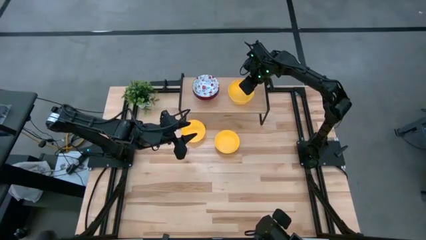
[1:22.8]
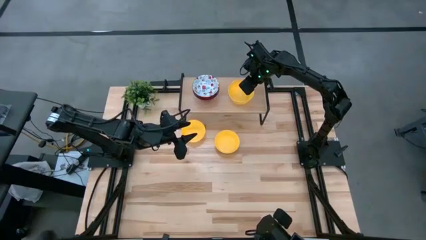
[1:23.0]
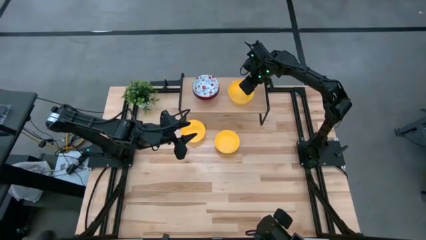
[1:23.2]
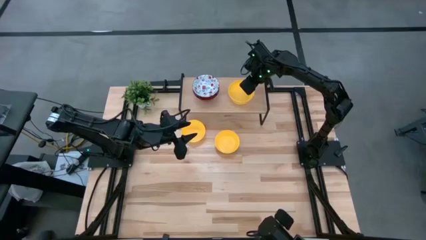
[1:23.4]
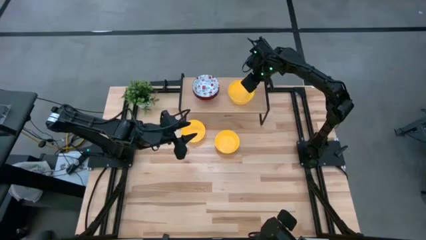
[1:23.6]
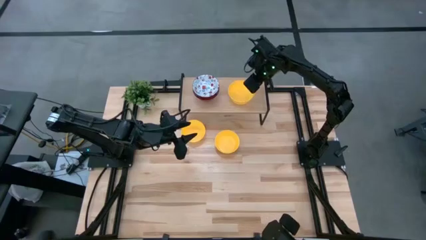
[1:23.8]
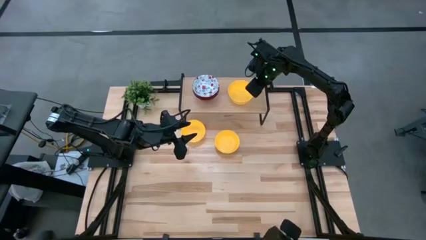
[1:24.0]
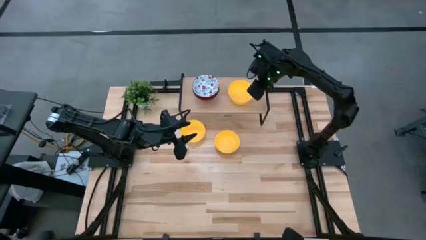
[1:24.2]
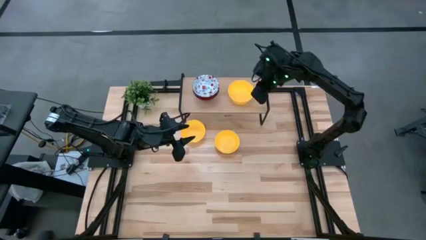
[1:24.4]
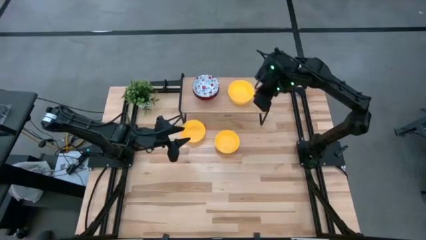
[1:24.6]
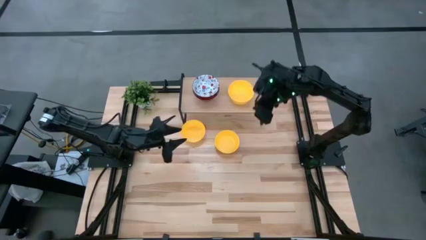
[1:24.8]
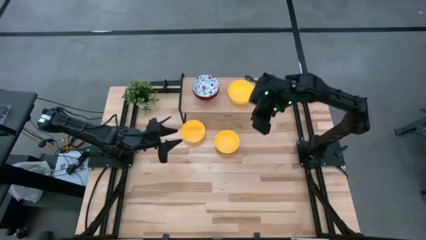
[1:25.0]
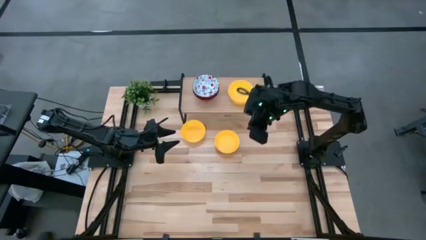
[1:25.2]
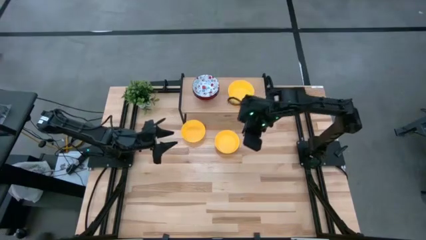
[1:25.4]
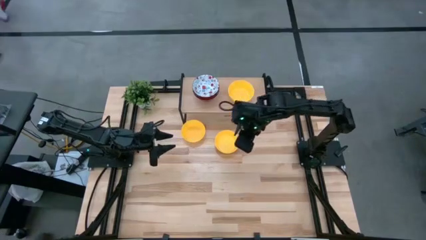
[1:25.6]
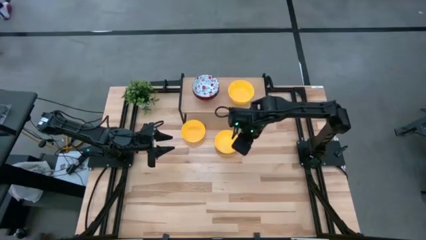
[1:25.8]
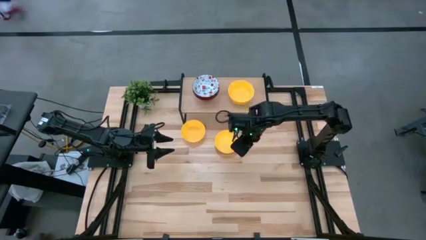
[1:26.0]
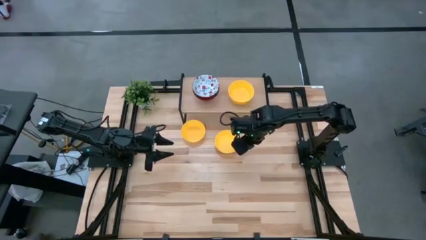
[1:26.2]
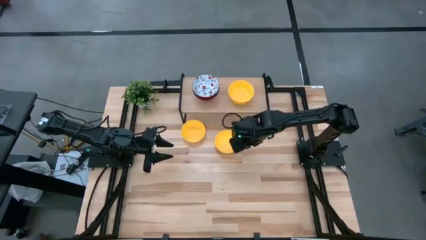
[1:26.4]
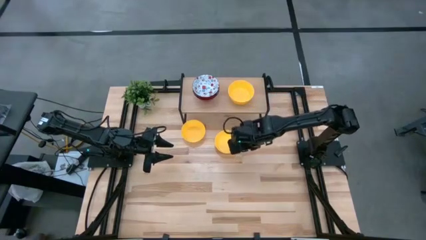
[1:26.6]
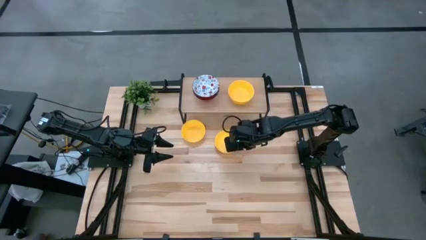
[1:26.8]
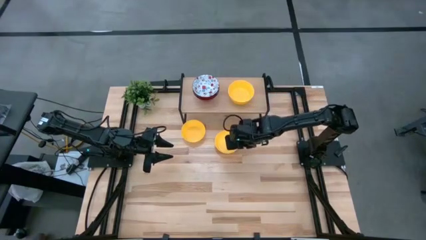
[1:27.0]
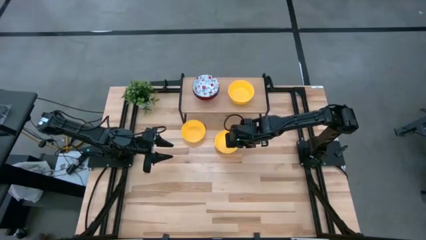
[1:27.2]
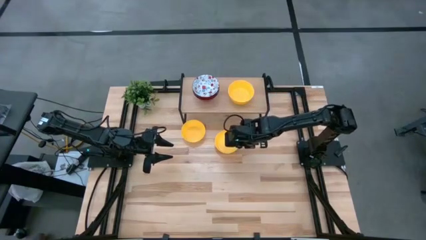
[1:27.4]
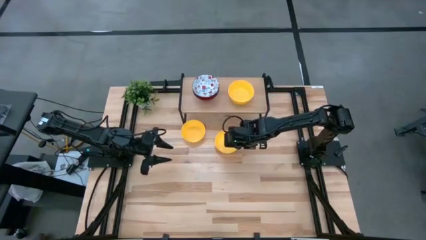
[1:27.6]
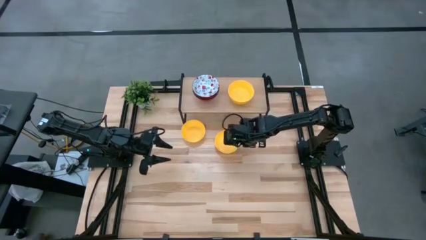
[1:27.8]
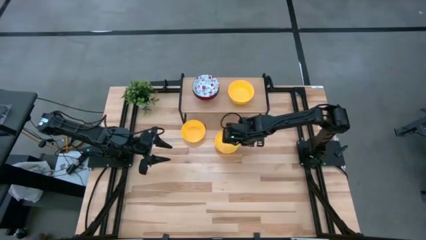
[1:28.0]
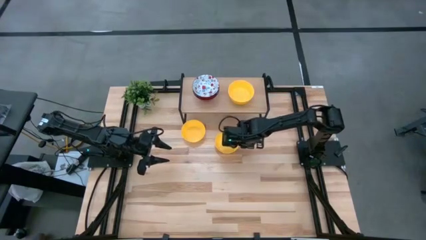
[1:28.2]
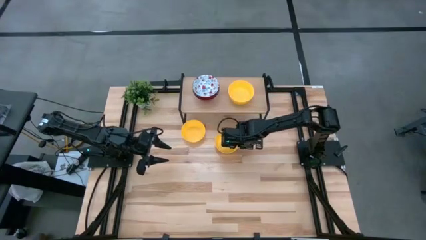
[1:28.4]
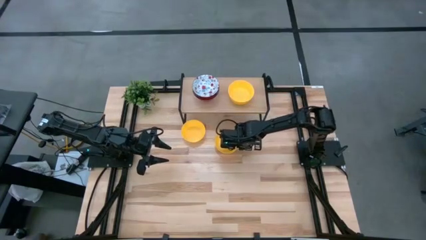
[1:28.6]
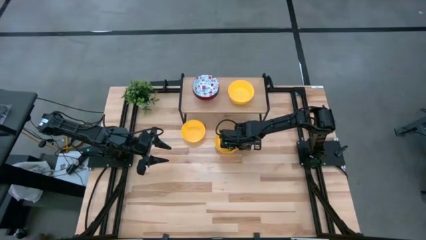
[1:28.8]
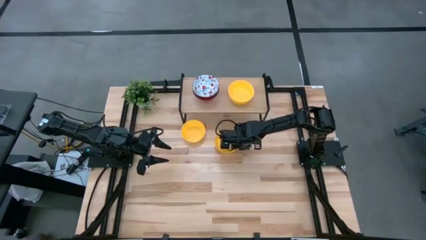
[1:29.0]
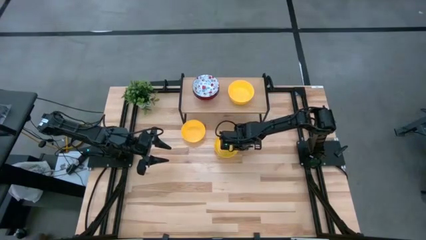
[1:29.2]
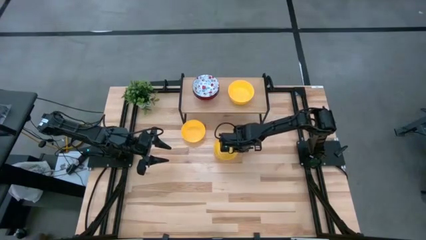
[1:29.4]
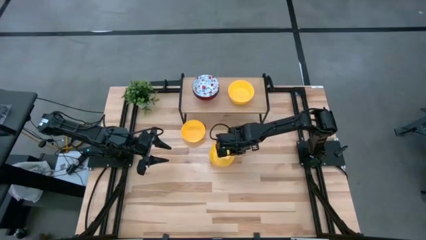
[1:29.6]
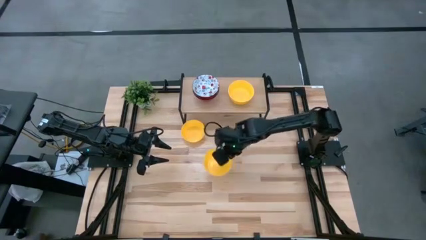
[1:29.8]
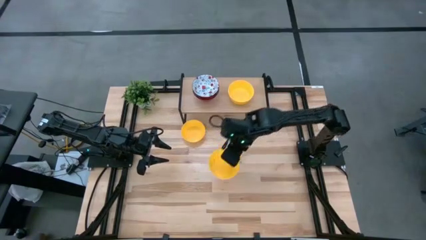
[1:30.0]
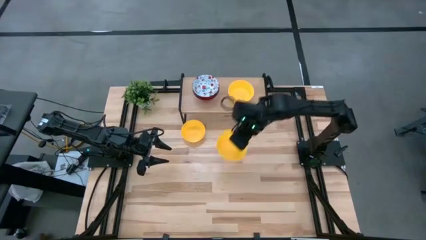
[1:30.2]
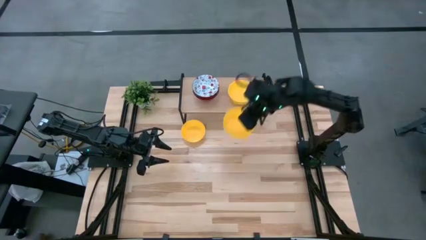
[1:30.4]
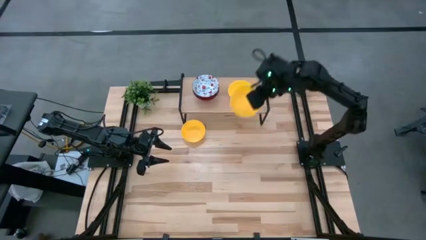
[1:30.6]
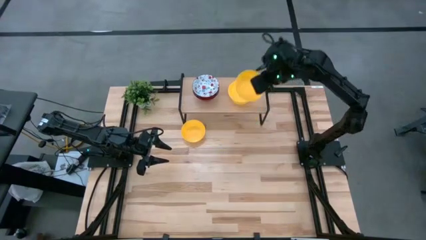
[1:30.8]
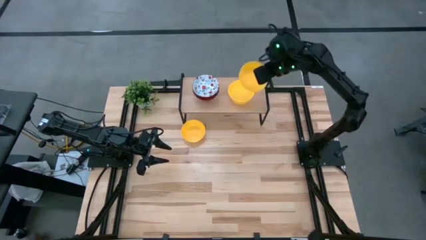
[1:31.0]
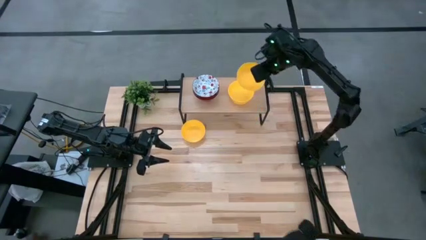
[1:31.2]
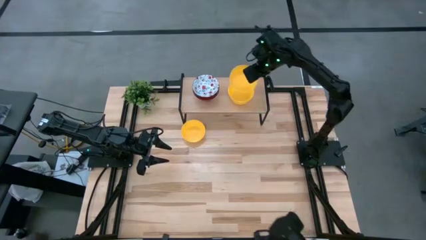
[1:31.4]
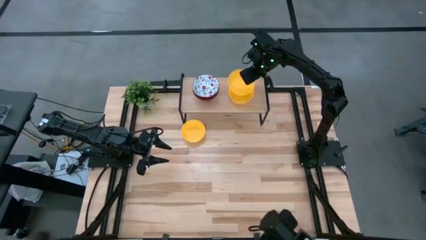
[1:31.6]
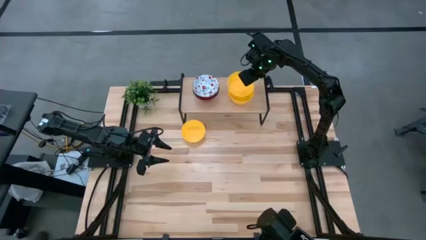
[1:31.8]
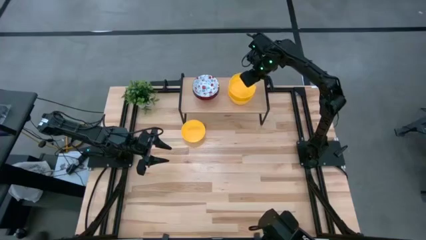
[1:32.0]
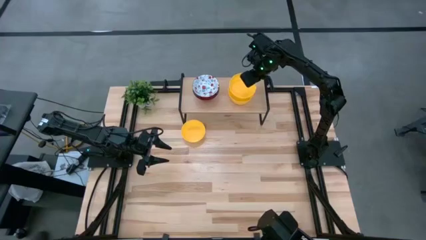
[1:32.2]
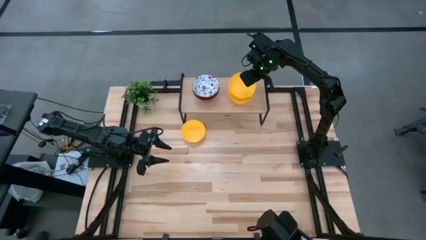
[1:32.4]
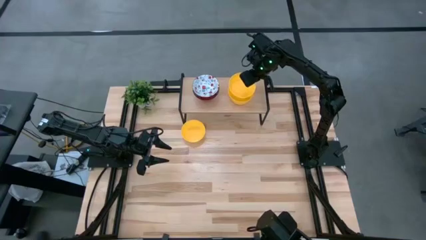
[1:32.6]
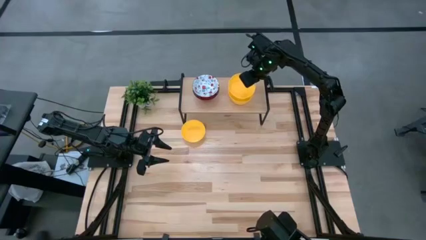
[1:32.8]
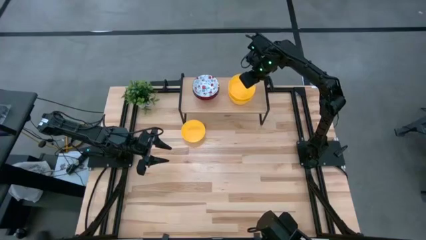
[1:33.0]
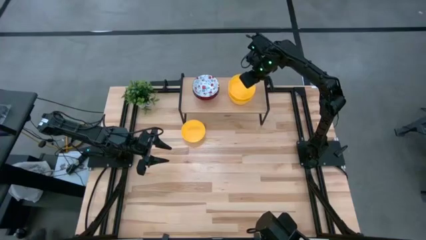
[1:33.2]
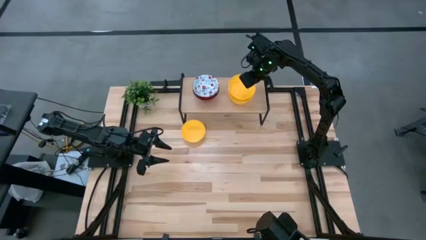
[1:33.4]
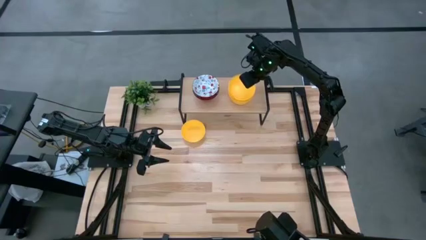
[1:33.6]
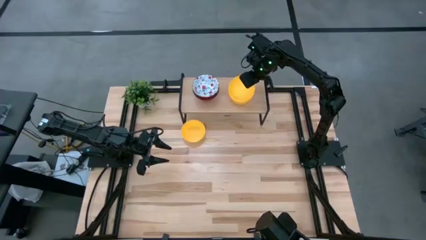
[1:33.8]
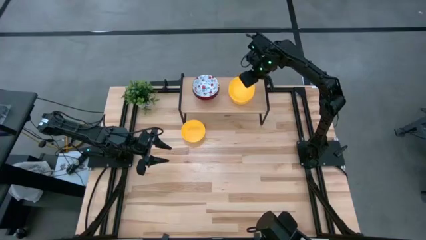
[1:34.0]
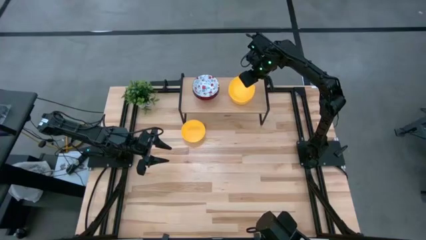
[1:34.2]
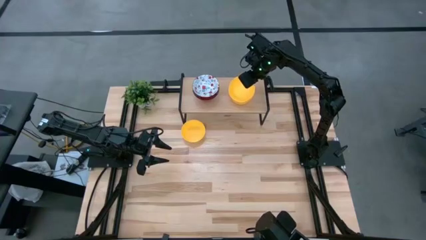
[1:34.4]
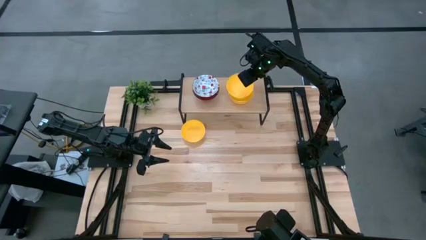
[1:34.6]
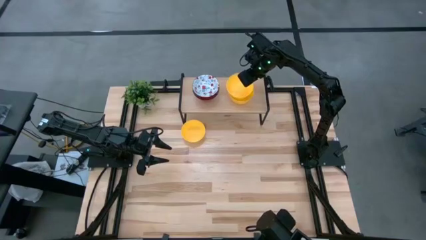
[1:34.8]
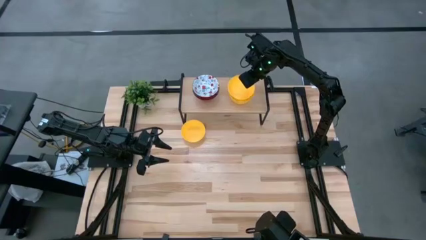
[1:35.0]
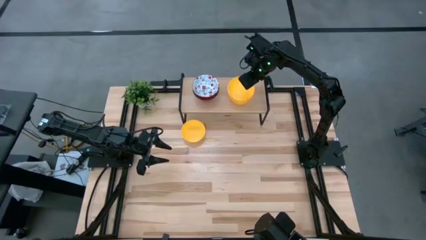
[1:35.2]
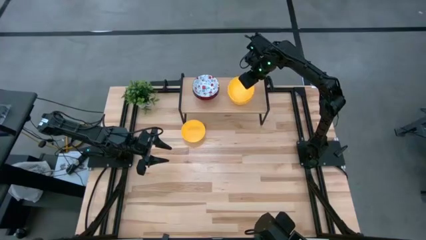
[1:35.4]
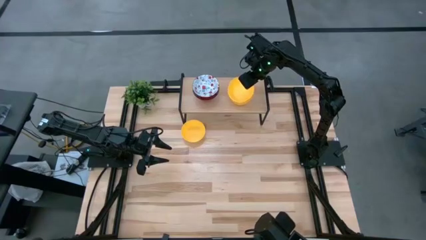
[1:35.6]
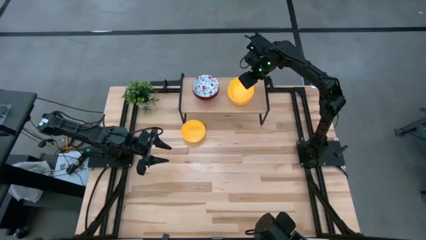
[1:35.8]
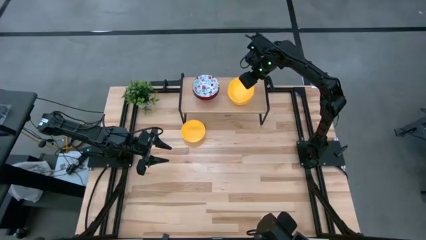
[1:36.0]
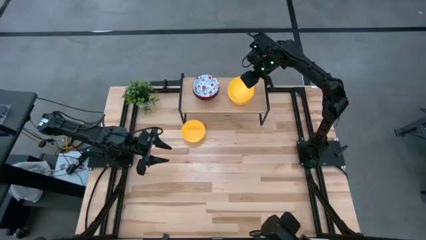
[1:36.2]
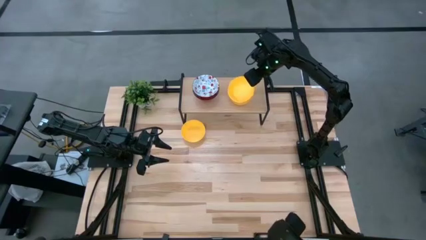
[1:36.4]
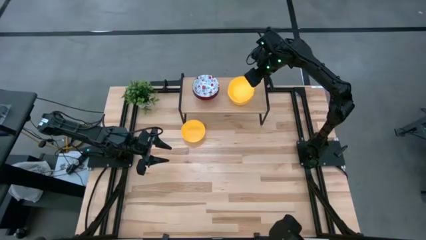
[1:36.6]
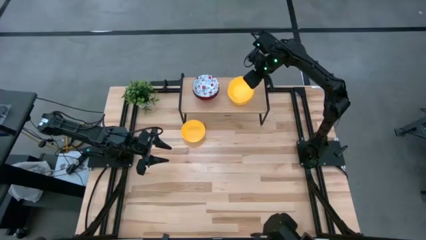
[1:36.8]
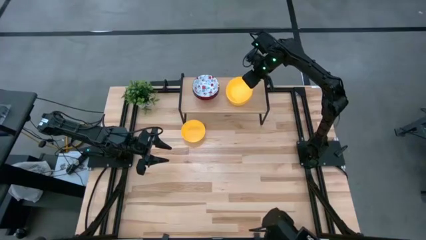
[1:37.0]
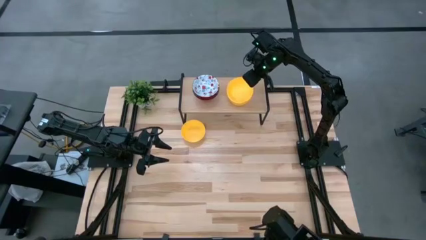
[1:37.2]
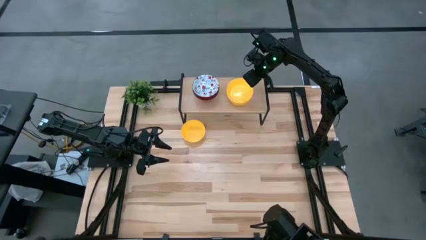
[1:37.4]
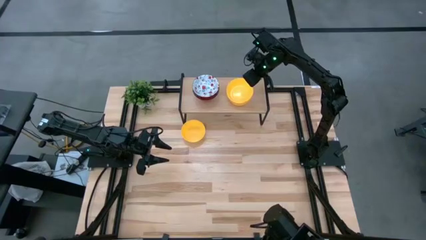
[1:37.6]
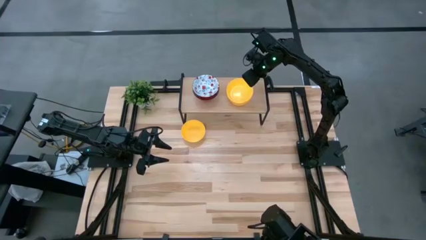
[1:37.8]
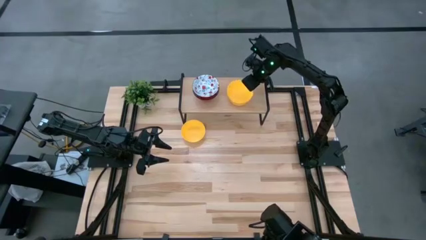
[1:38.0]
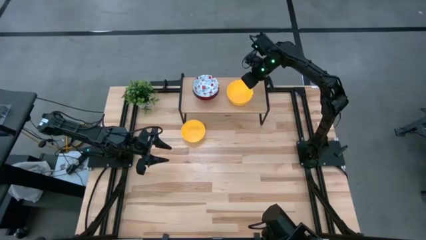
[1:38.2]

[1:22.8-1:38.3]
Task: Pick & Place Mini bowls
Stack the right yellow bowl on top of the yellow bowl on the shelf
